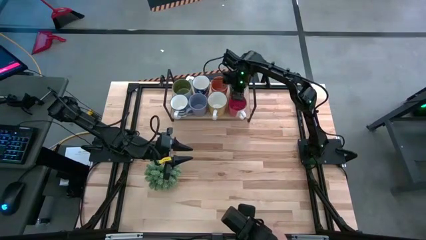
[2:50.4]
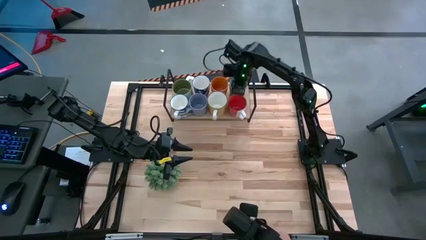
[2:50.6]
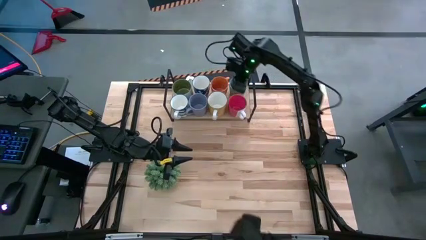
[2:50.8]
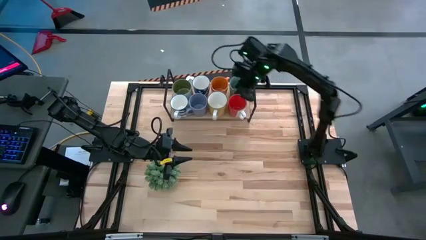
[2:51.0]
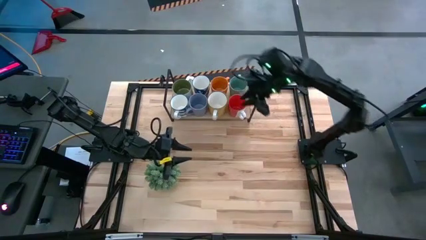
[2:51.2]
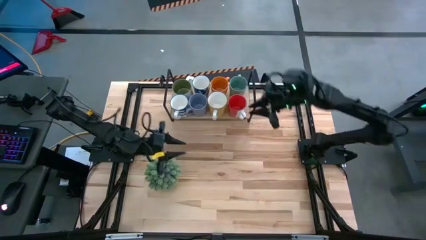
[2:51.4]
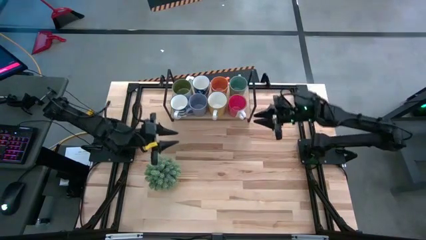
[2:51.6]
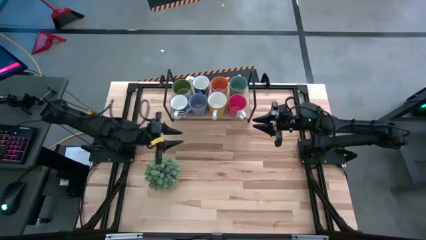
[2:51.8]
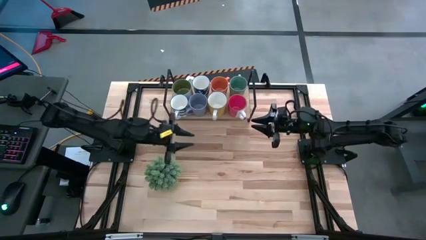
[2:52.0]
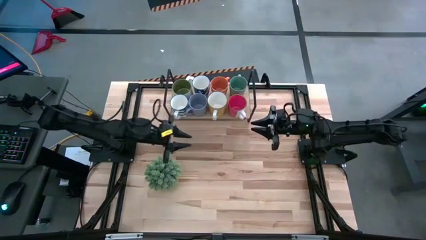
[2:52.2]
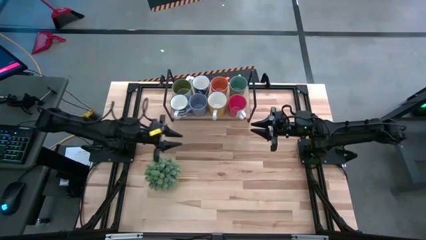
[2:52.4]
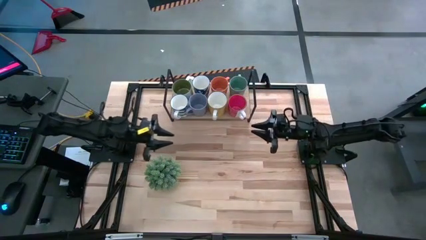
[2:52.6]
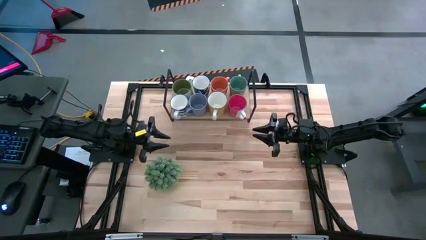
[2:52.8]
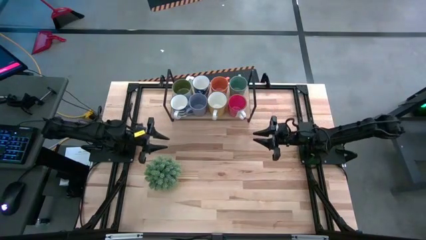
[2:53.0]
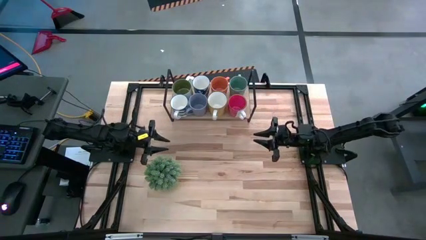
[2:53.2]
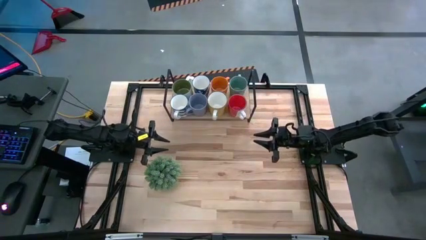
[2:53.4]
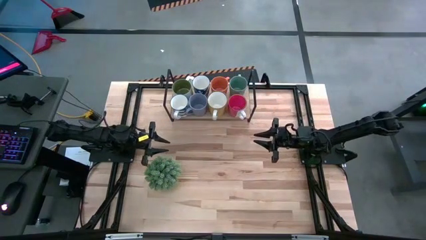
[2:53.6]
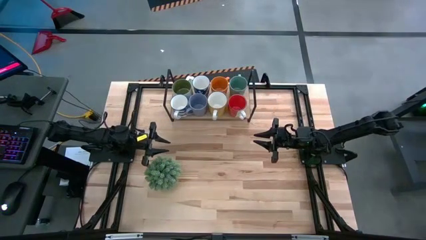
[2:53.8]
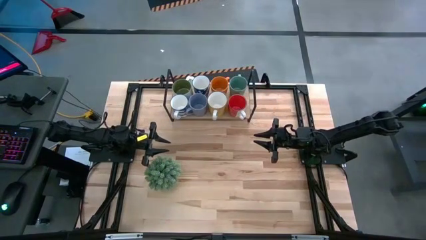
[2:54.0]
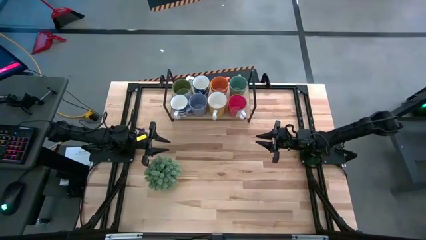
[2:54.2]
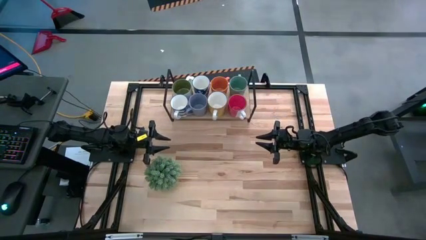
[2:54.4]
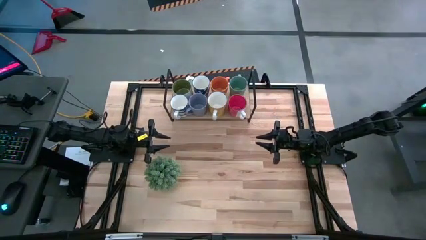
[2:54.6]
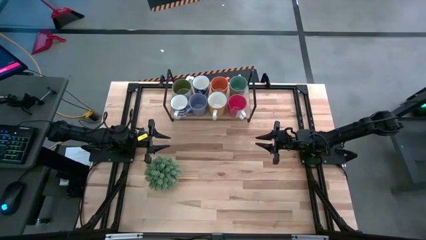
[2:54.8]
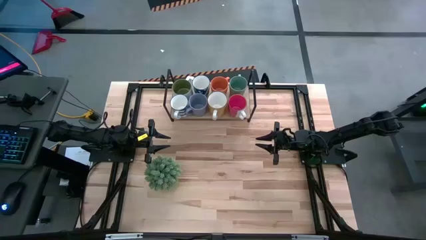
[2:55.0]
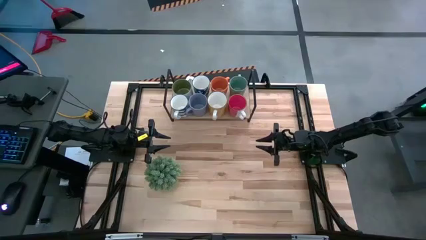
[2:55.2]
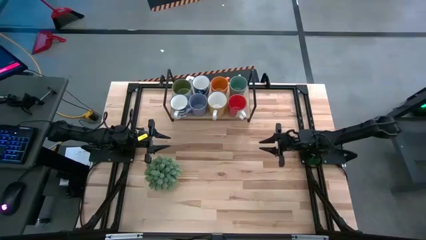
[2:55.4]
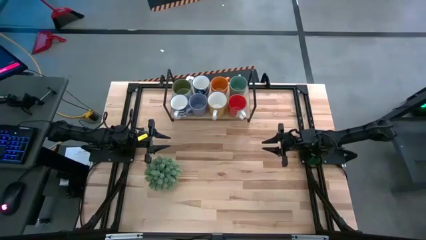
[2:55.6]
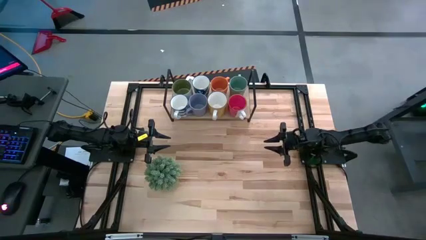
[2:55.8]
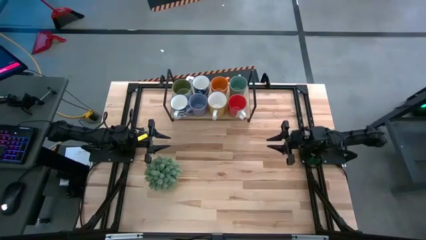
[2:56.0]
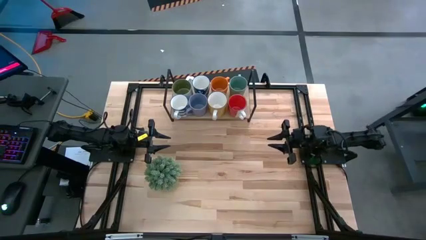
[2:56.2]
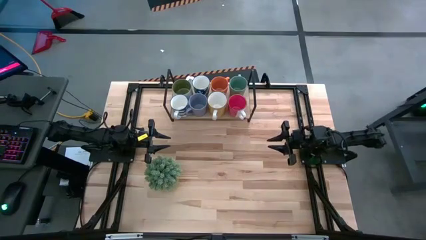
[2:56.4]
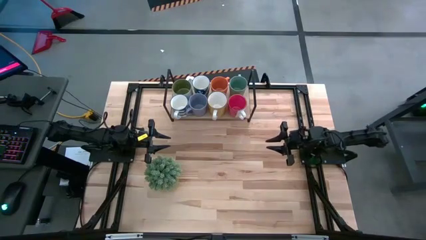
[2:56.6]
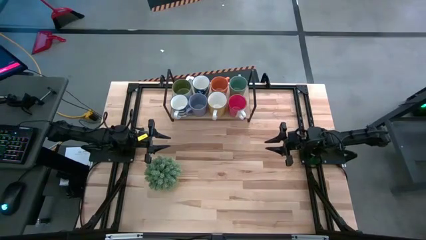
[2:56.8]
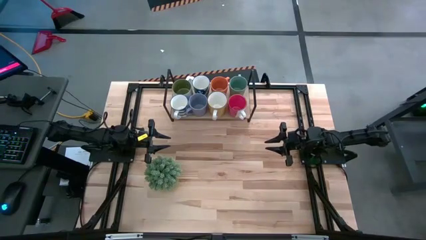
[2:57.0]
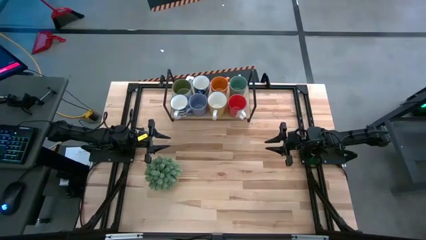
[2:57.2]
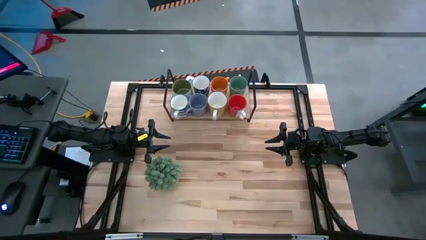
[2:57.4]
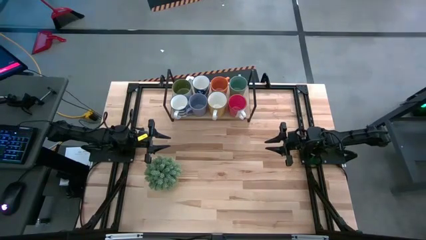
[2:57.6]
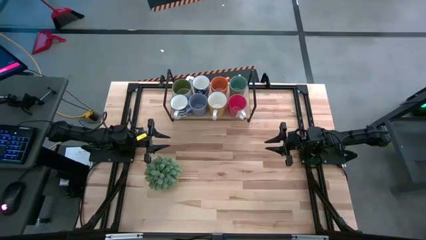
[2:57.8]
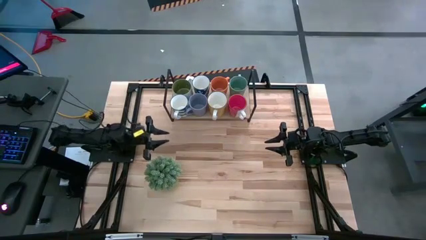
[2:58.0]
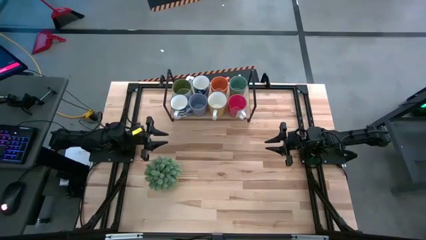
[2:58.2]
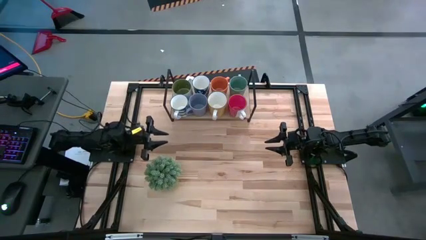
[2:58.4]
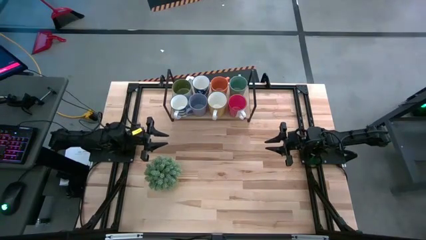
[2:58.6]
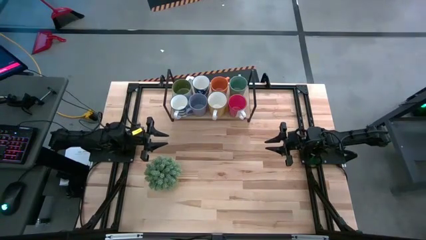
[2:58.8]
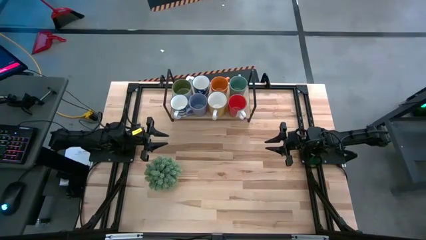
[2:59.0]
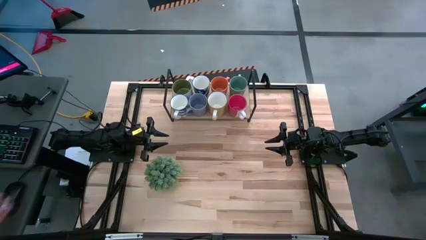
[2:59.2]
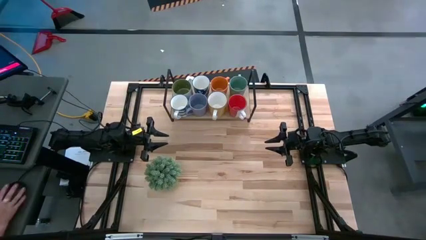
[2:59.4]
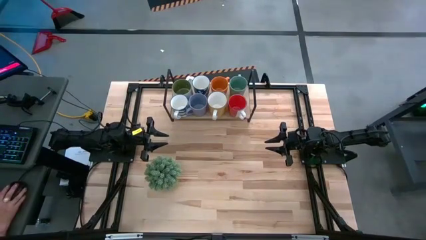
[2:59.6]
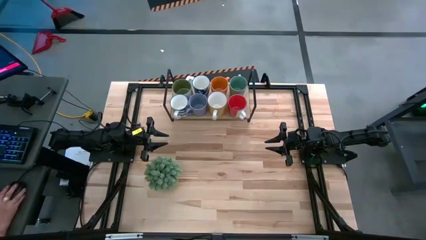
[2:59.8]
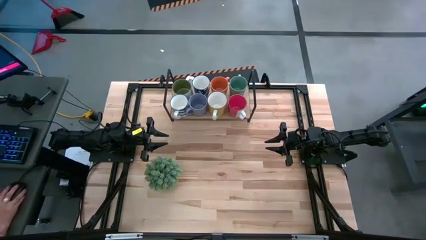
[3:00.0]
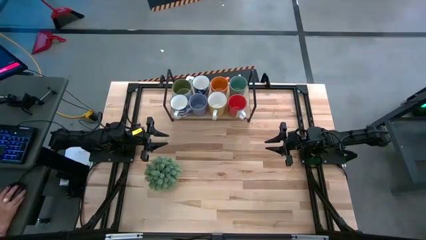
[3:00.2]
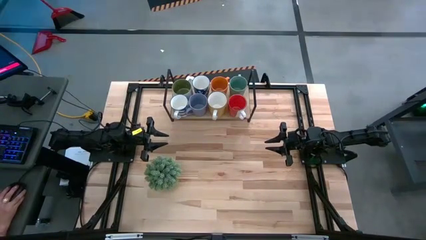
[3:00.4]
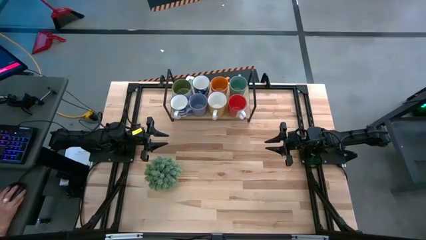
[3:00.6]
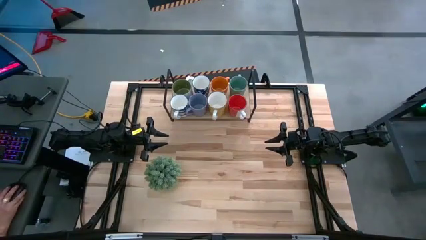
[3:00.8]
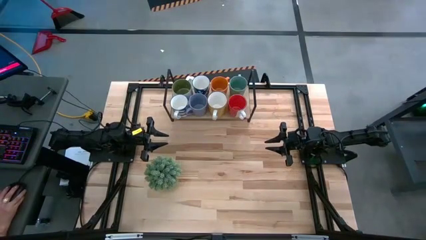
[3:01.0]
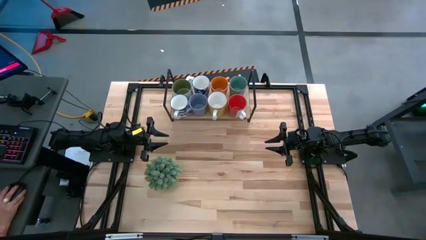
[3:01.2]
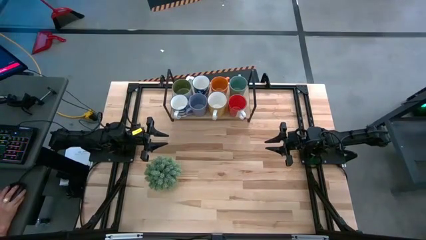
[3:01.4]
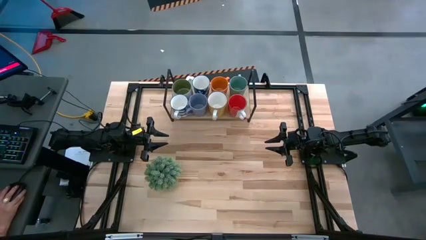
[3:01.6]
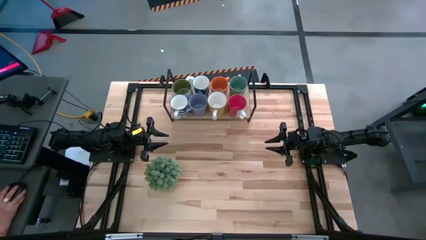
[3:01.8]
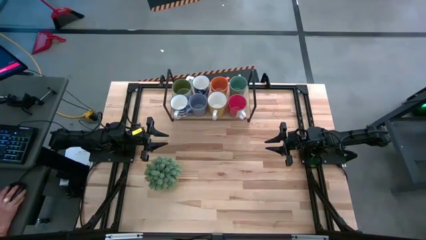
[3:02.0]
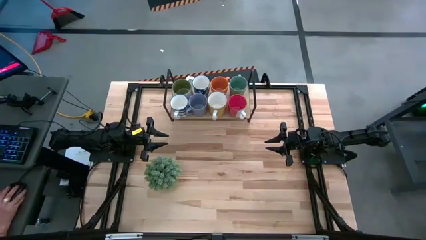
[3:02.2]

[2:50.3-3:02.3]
Task: Place coffee mugs
Return to Home Position
